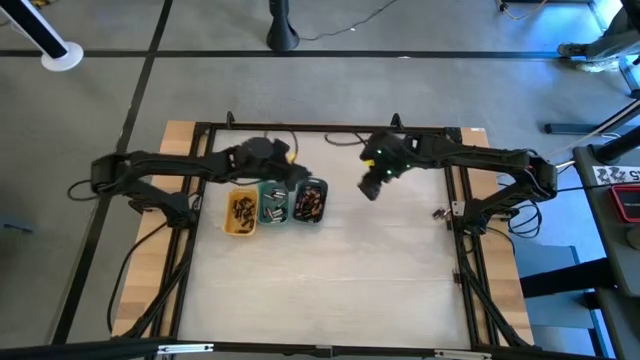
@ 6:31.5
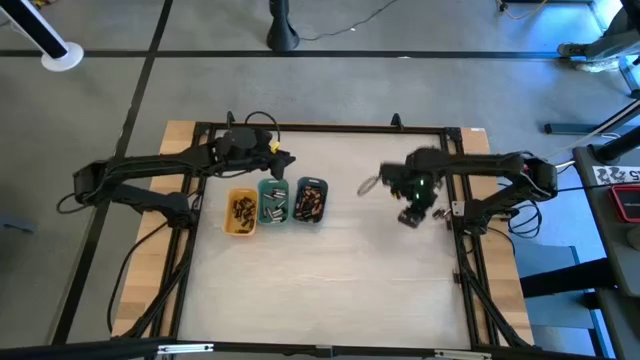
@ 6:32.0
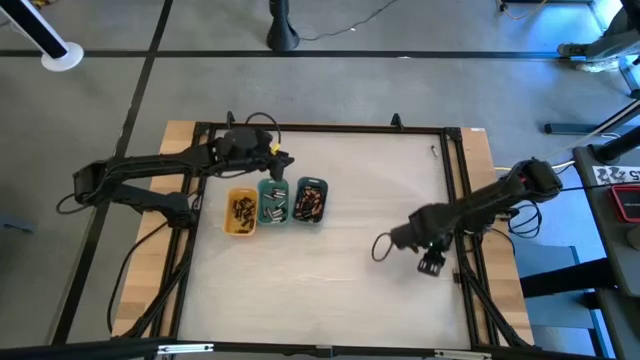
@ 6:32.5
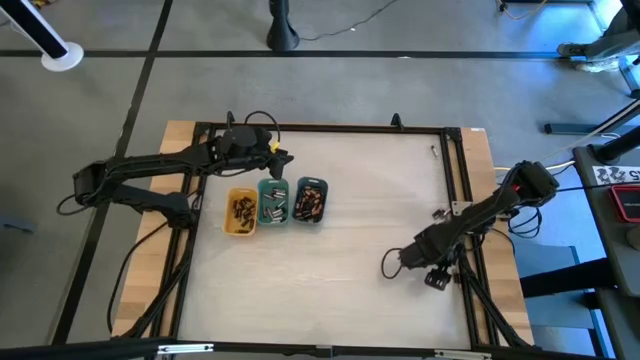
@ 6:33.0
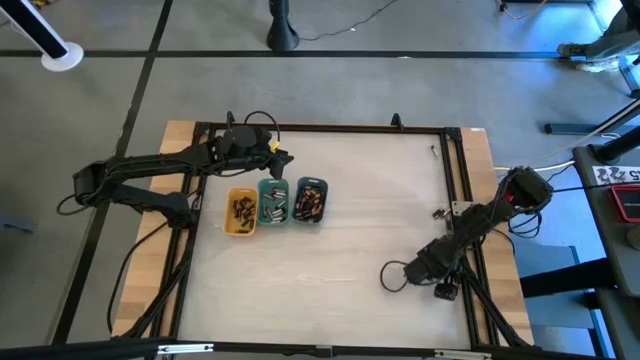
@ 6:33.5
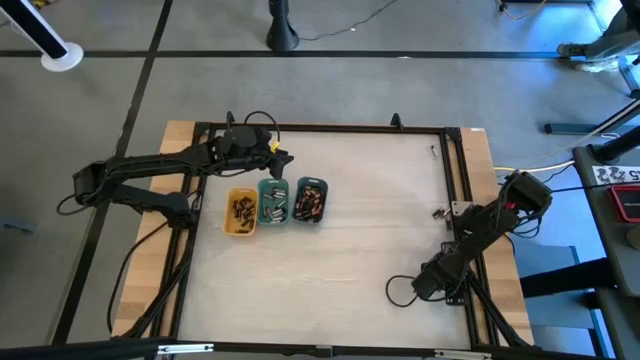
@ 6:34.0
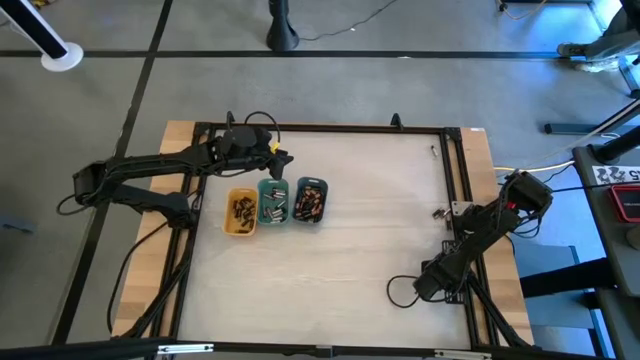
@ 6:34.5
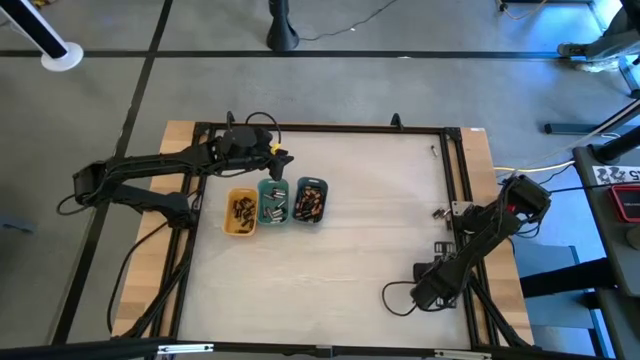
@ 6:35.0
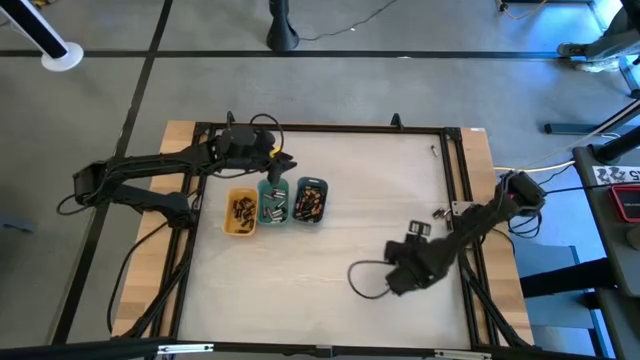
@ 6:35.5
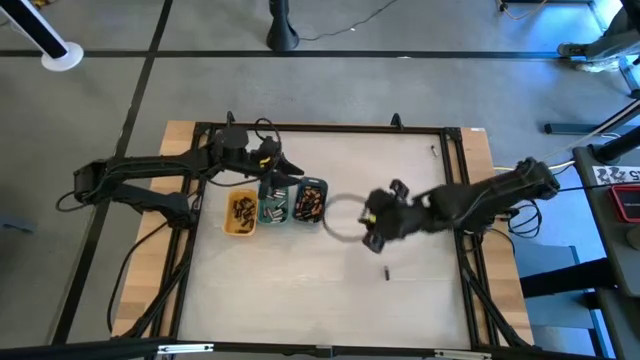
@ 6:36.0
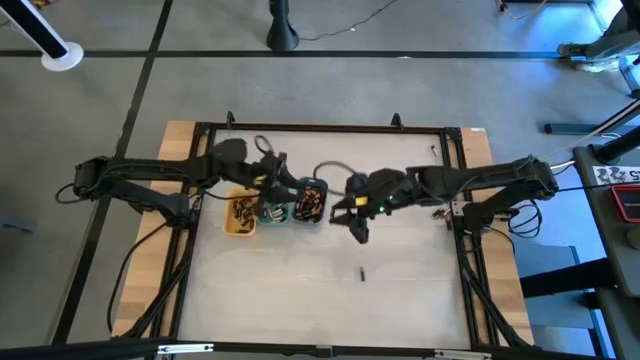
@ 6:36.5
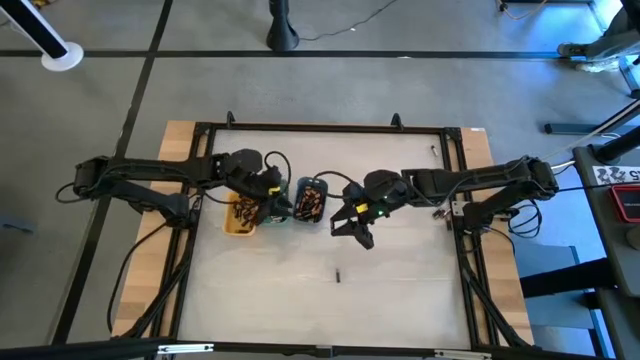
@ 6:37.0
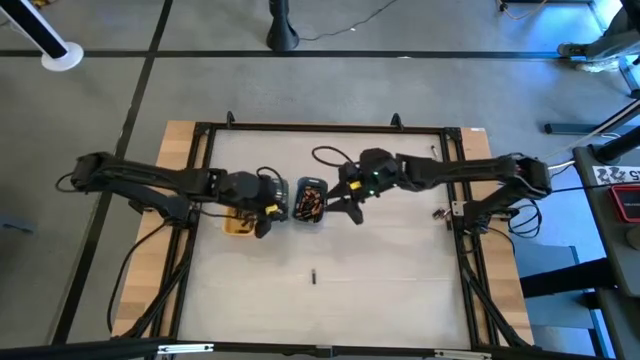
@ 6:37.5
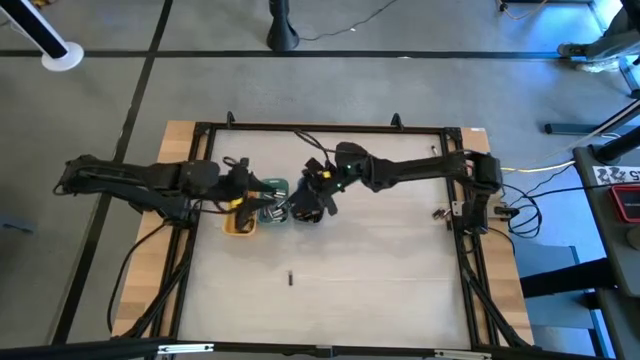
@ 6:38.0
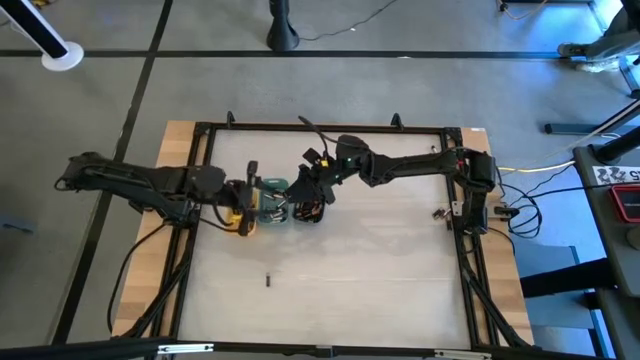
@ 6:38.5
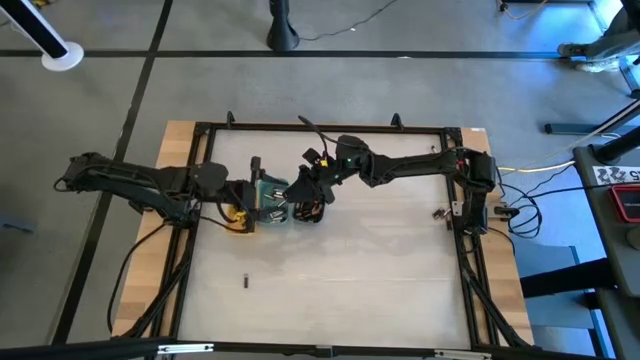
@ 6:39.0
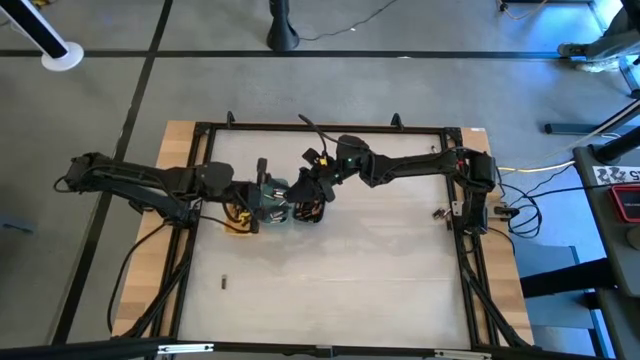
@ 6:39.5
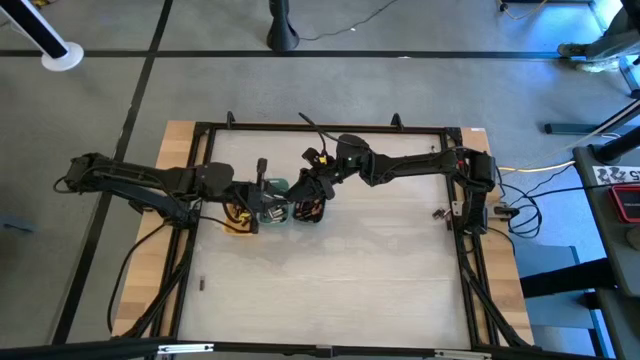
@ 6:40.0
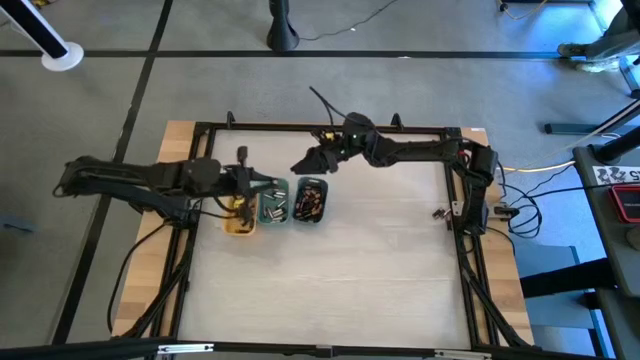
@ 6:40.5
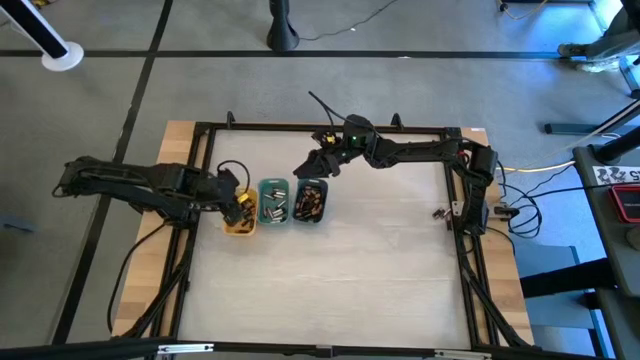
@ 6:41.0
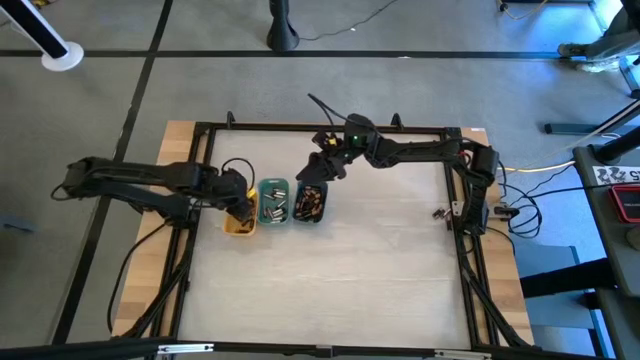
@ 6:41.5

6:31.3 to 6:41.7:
Task: Sort batteries
Put the small black battery into the yellow bin

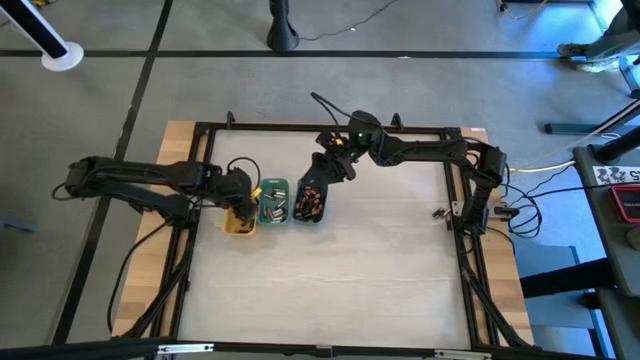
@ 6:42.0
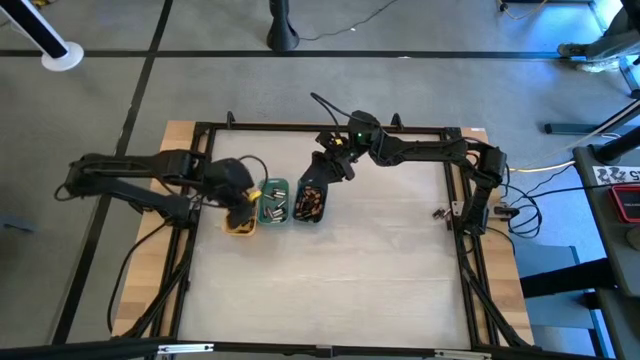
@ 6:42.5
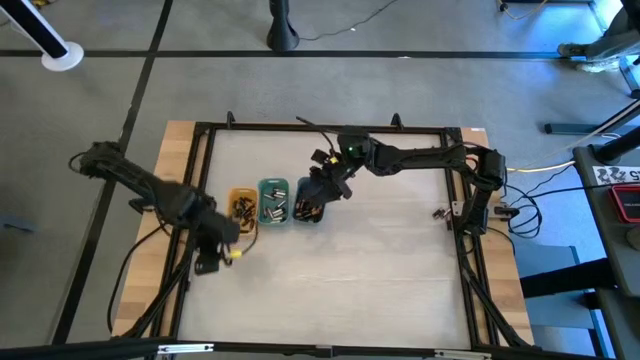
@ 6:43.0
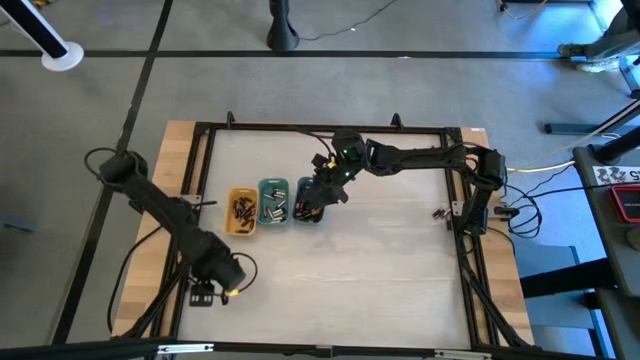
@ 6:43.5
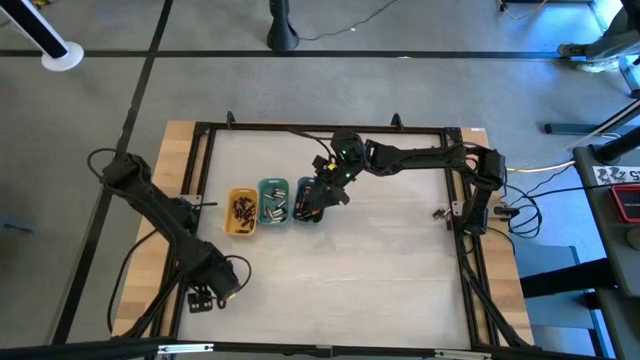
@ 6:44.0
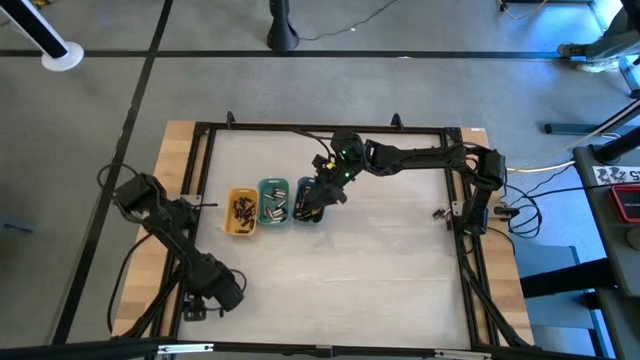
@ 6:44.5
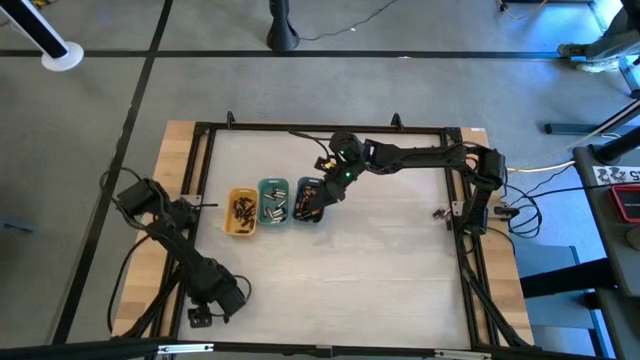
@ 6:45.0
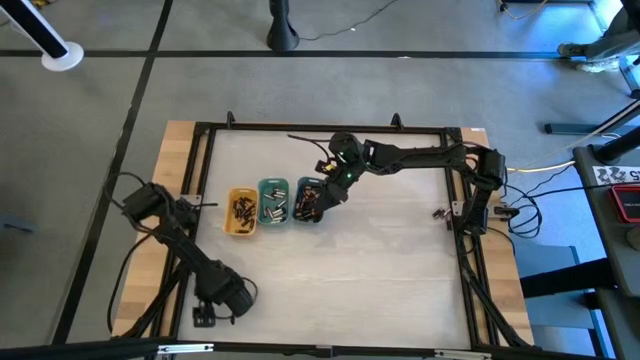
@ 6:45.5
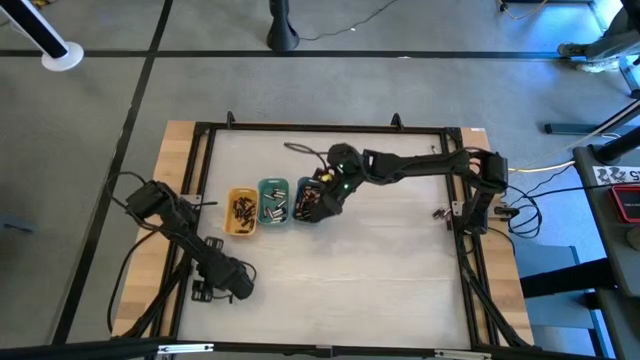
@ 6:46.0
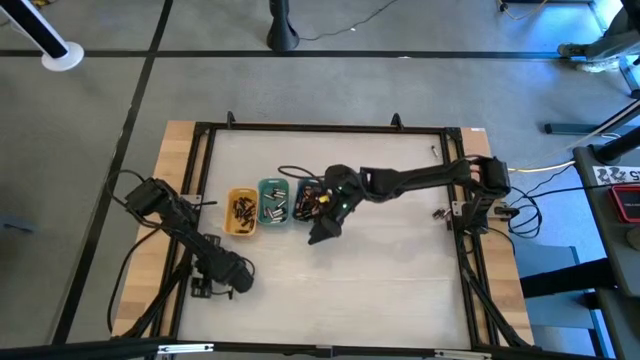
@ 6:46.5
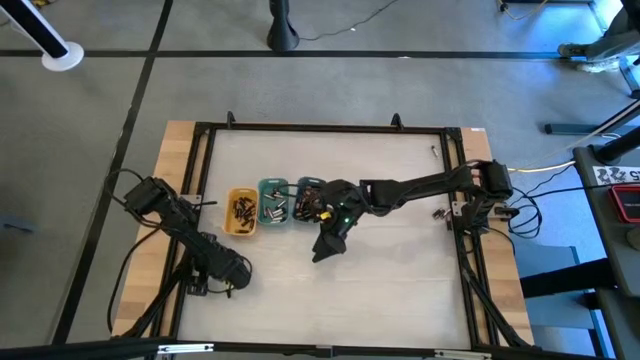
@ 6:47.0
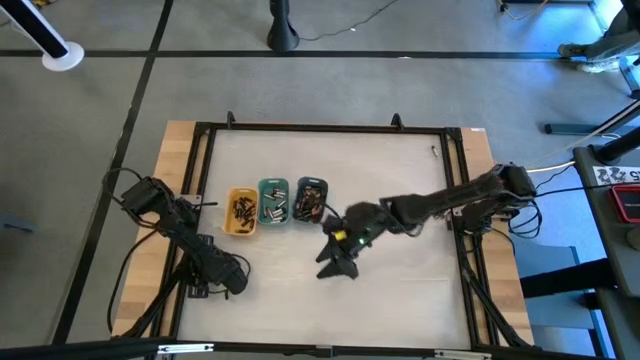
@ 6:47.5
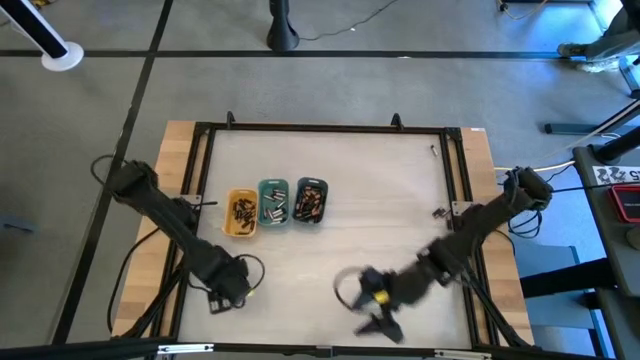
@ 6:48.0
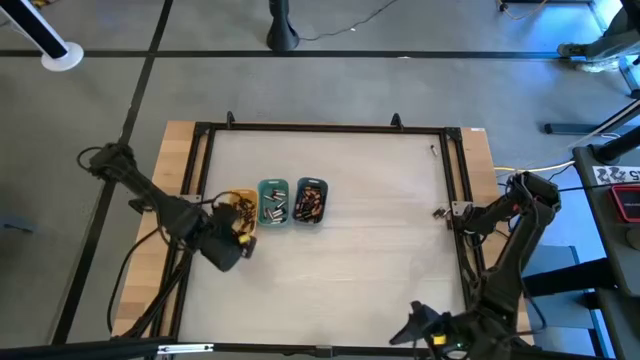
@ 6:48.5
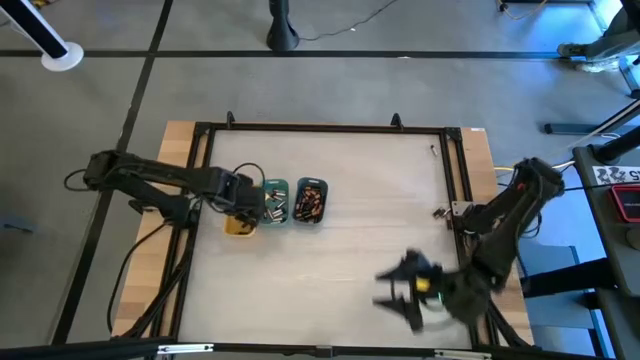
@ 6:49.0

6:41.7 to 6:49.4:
Put the small black battery into the yellow bin

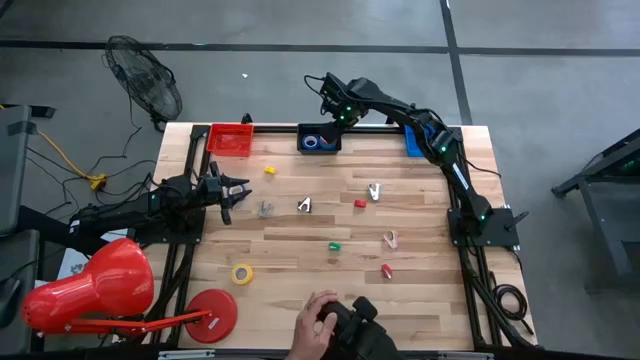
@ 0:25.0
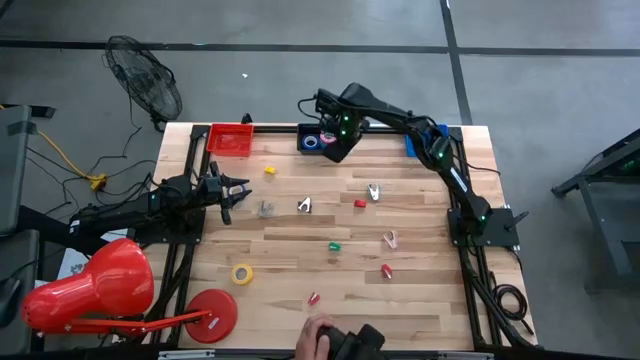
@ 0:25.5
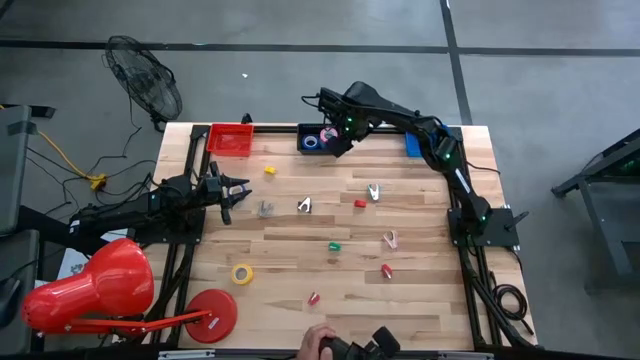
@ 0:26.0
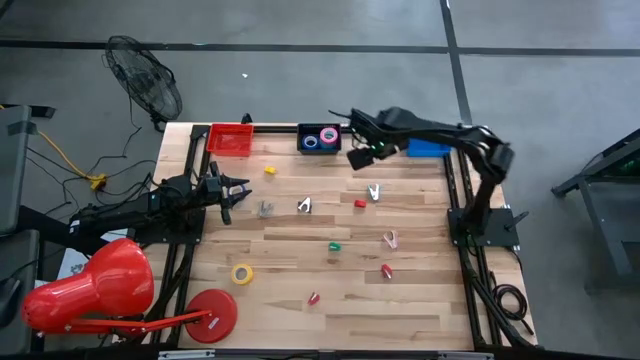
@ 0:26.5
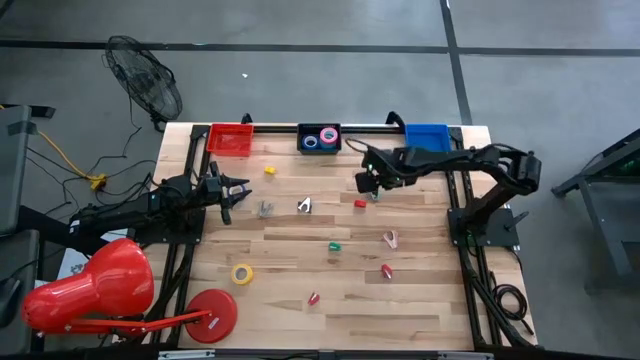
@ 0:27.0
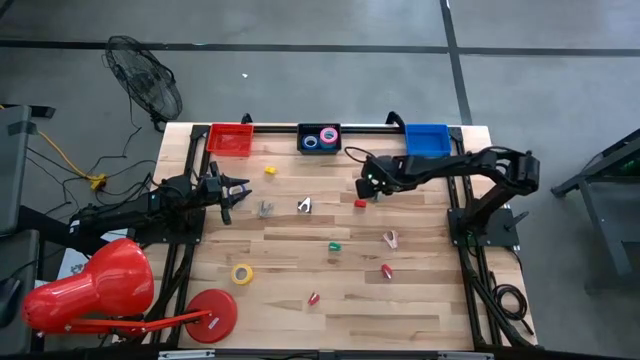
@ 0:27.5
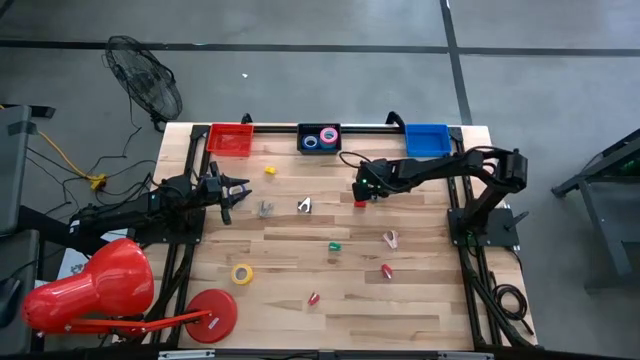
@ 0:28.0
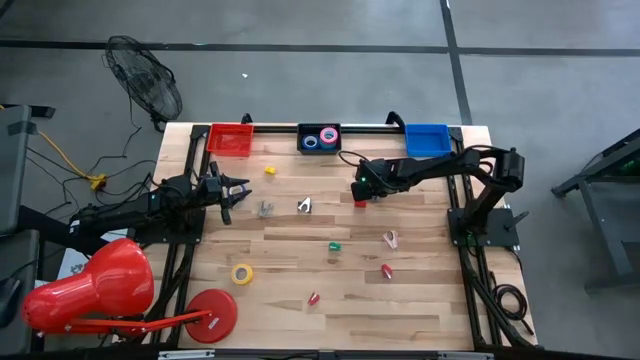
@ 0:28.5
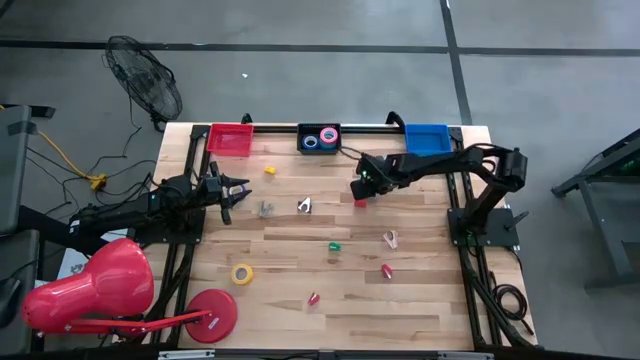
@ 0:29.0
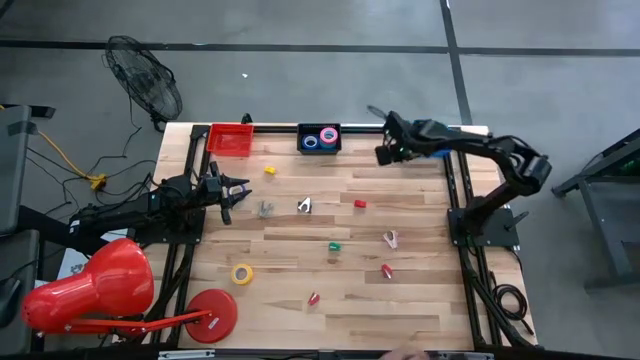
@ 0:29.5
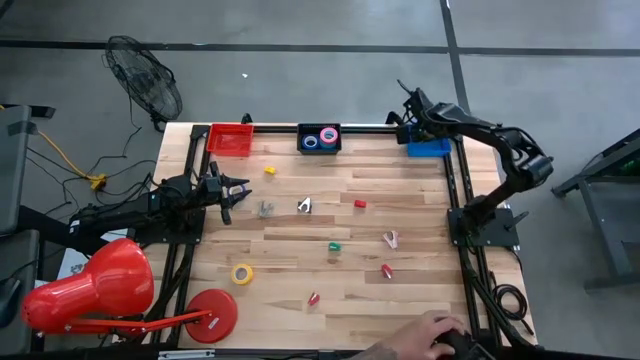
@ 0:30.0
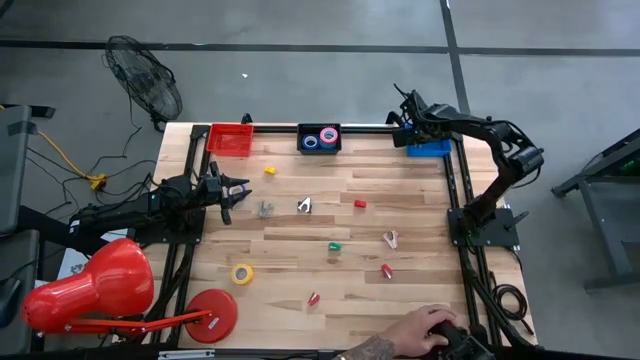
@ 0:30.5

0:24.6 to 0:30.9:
Task: Pick and place Stapler, Stapler remover, tape
Put the light blue staple remover into the blue bin
